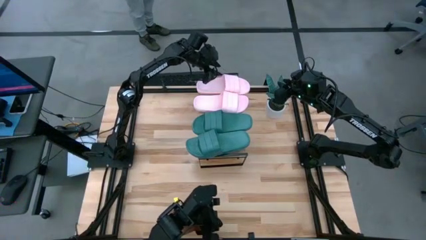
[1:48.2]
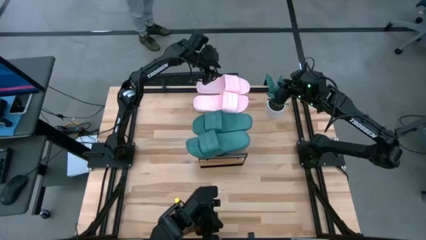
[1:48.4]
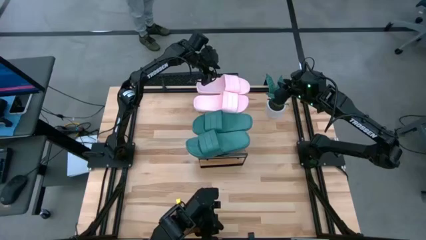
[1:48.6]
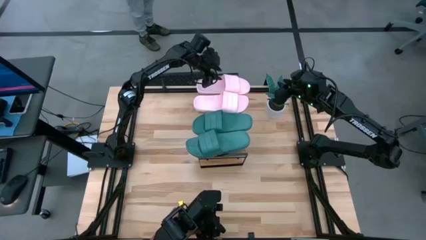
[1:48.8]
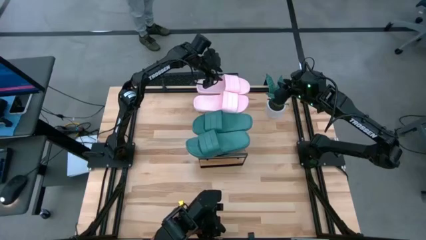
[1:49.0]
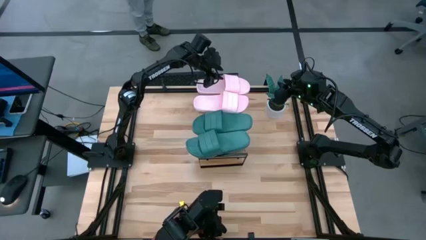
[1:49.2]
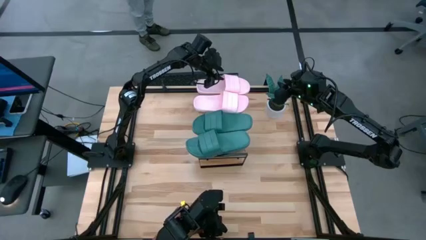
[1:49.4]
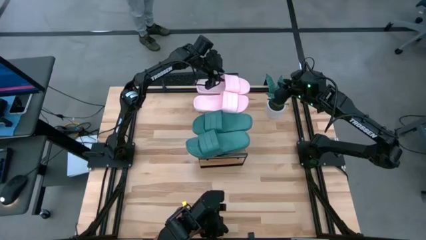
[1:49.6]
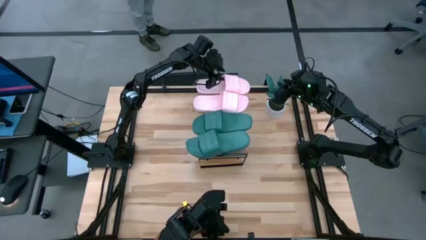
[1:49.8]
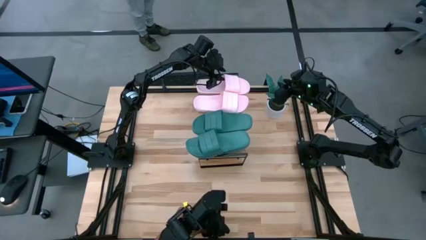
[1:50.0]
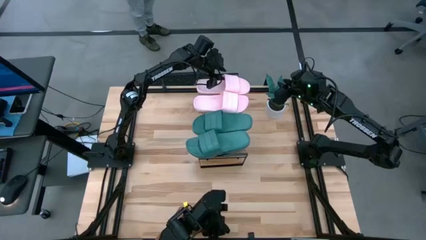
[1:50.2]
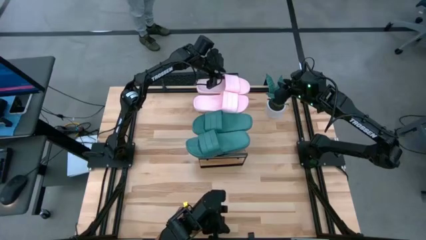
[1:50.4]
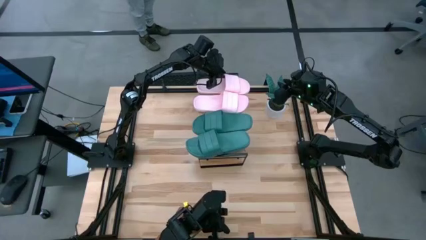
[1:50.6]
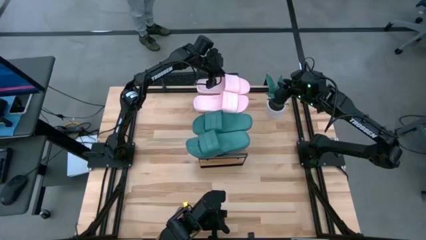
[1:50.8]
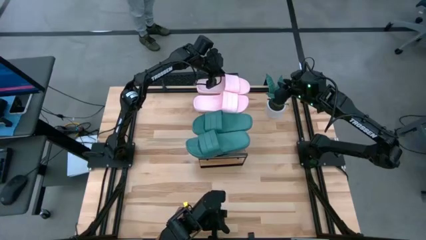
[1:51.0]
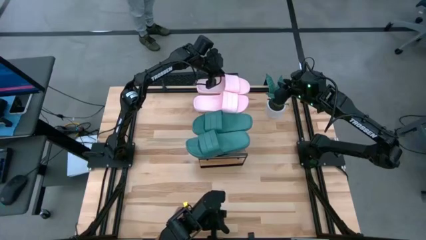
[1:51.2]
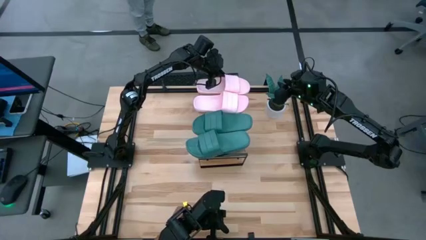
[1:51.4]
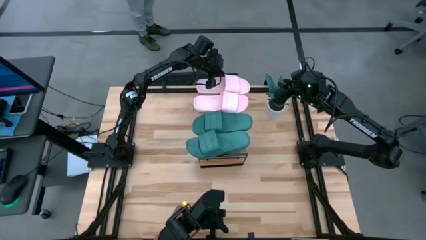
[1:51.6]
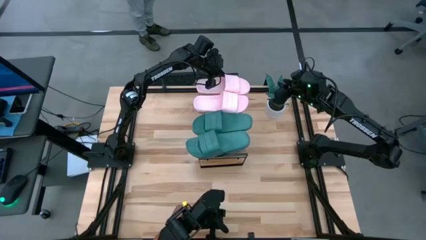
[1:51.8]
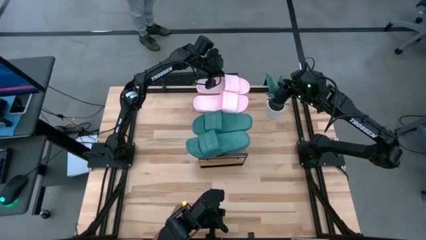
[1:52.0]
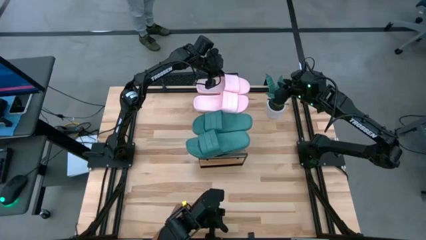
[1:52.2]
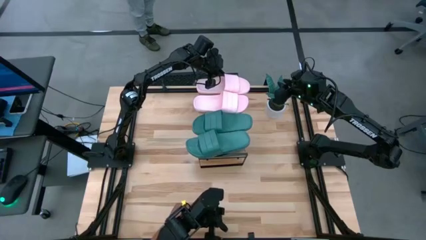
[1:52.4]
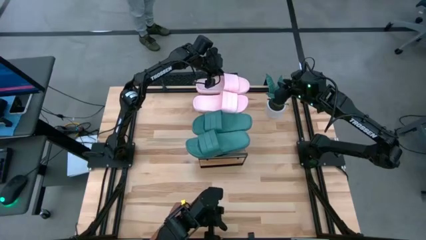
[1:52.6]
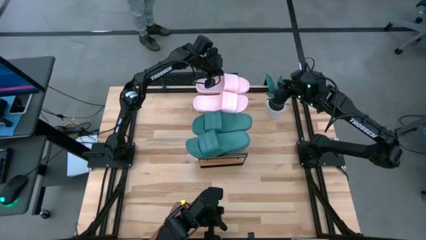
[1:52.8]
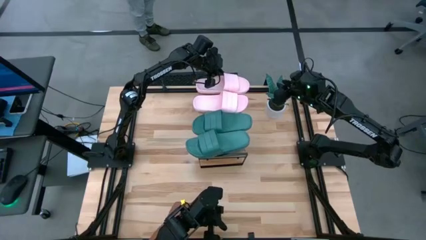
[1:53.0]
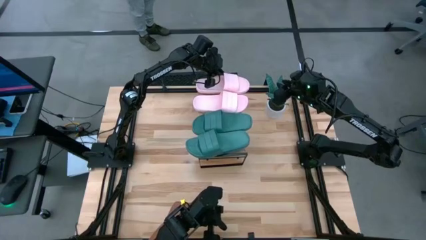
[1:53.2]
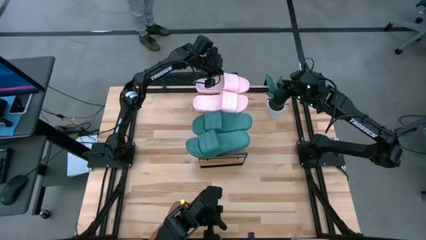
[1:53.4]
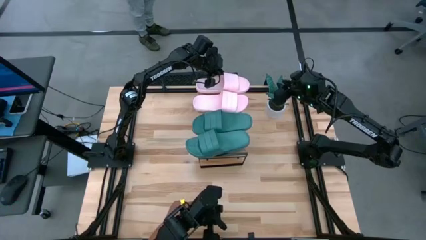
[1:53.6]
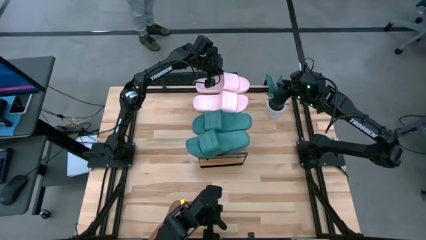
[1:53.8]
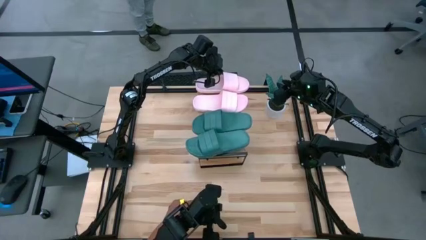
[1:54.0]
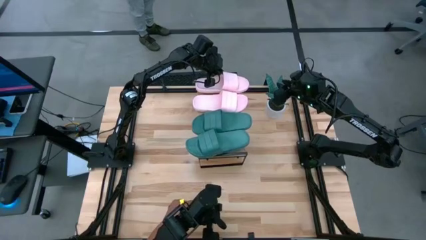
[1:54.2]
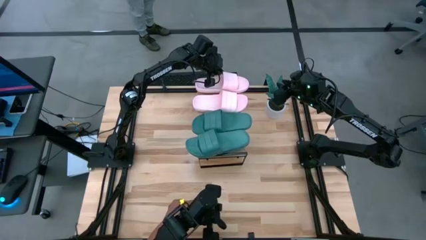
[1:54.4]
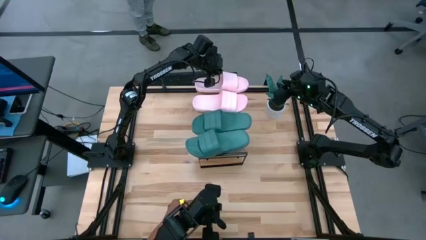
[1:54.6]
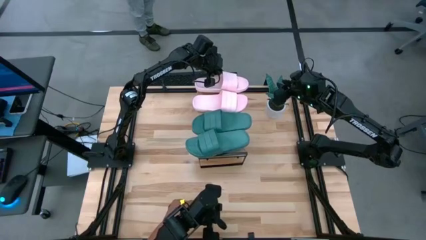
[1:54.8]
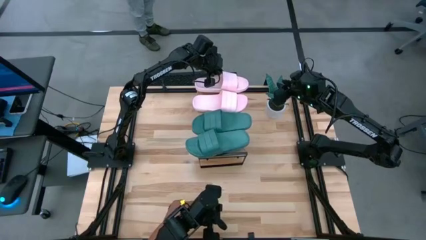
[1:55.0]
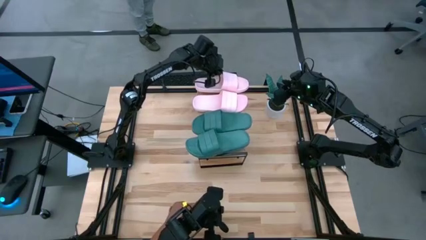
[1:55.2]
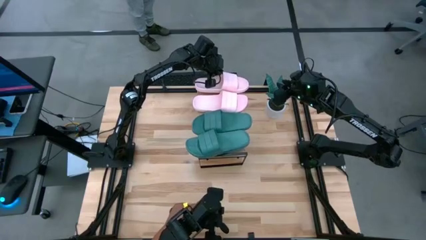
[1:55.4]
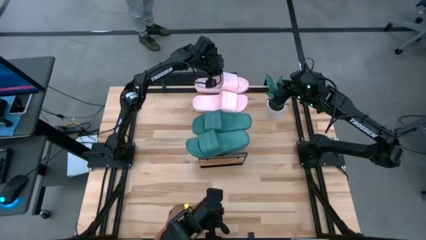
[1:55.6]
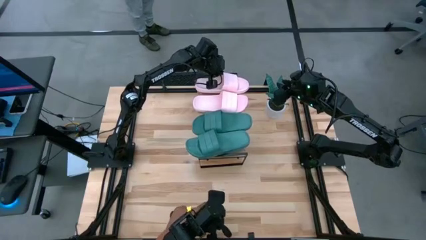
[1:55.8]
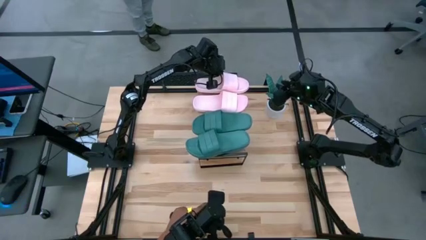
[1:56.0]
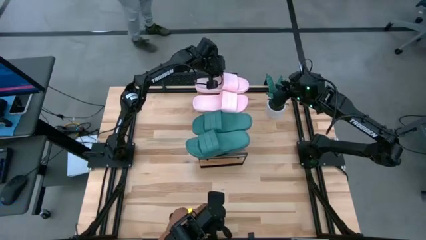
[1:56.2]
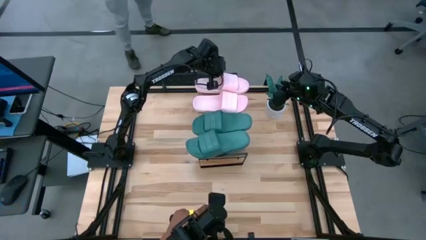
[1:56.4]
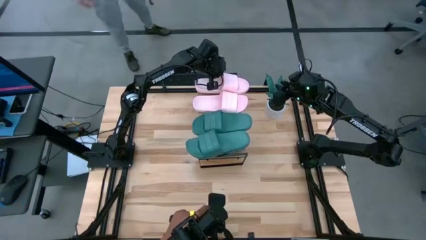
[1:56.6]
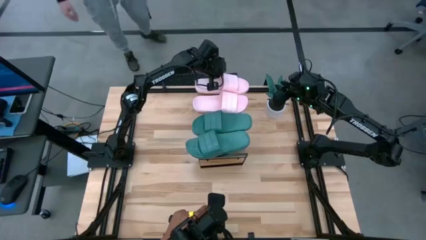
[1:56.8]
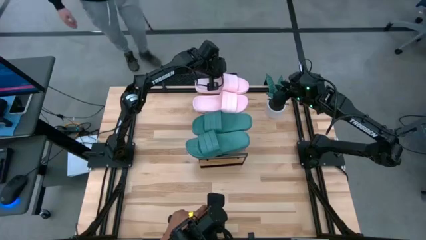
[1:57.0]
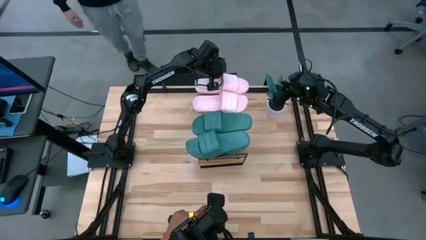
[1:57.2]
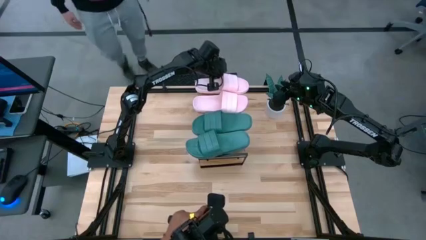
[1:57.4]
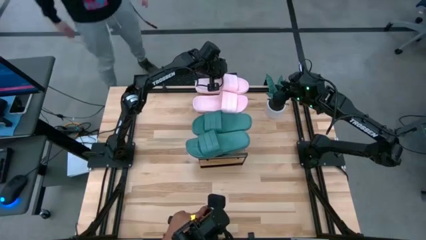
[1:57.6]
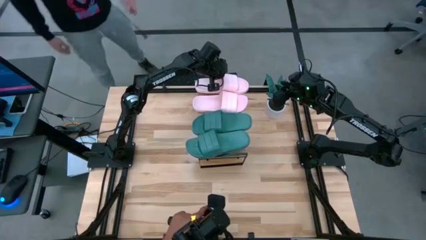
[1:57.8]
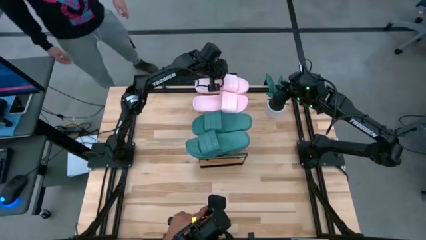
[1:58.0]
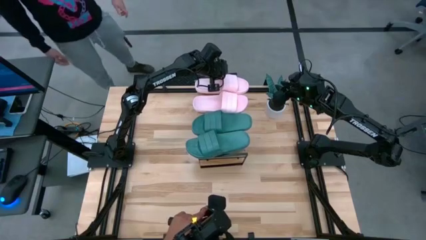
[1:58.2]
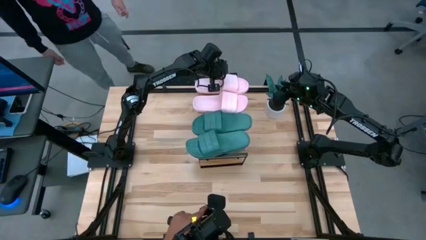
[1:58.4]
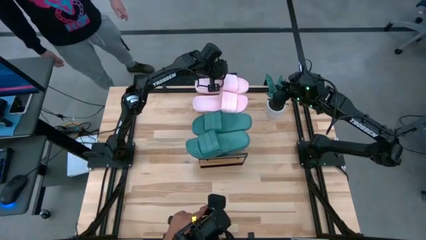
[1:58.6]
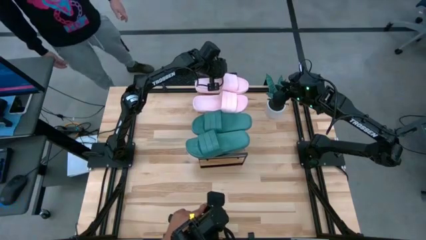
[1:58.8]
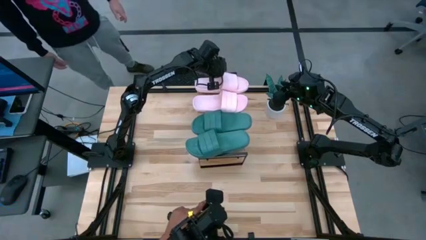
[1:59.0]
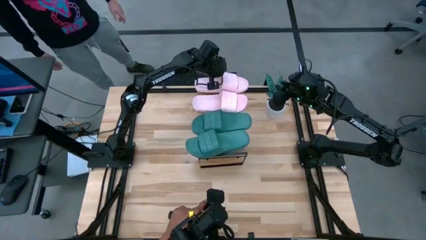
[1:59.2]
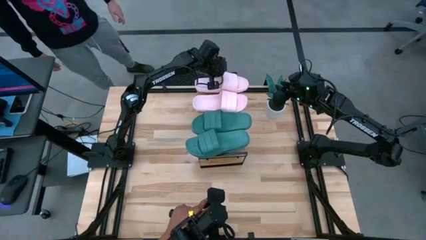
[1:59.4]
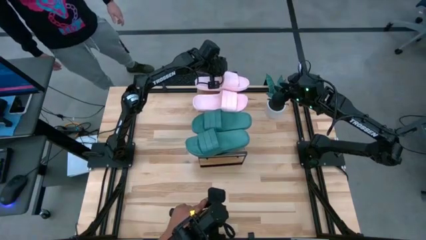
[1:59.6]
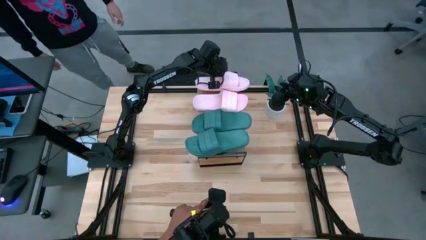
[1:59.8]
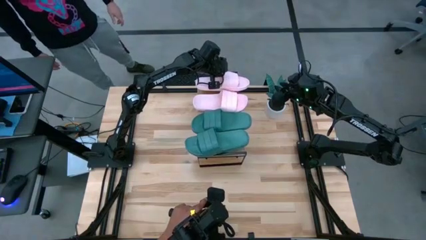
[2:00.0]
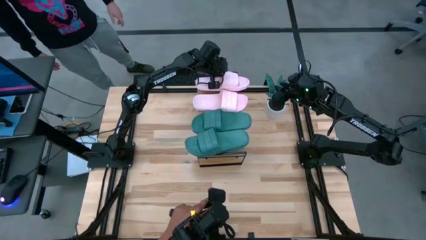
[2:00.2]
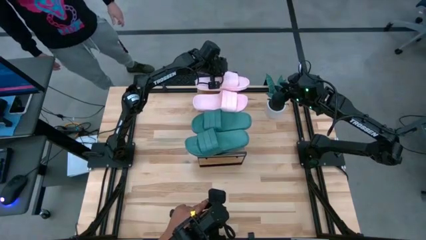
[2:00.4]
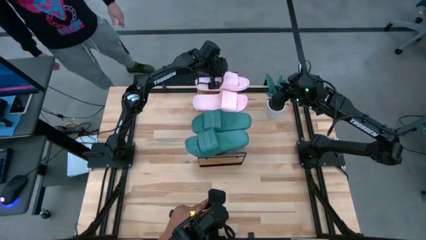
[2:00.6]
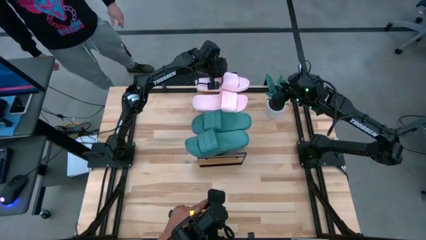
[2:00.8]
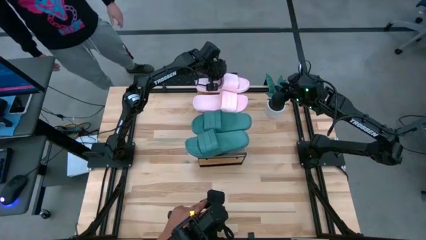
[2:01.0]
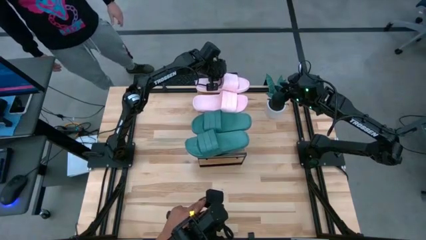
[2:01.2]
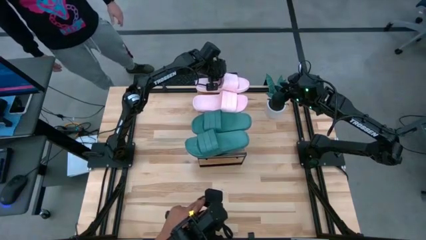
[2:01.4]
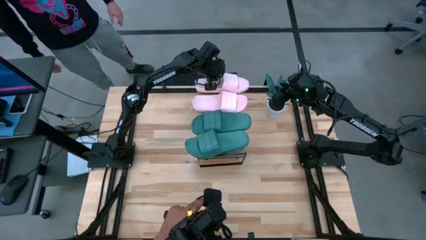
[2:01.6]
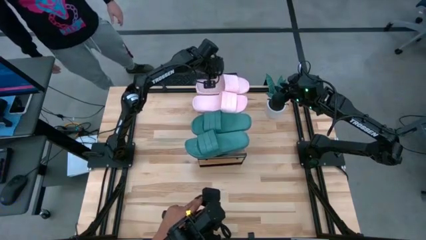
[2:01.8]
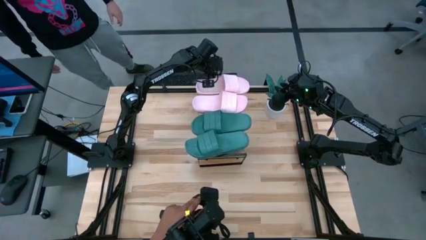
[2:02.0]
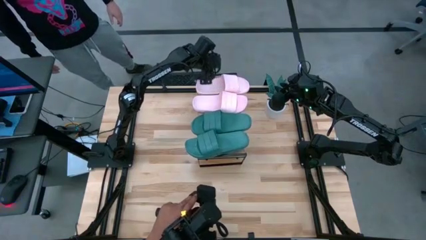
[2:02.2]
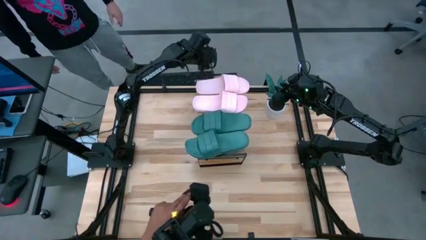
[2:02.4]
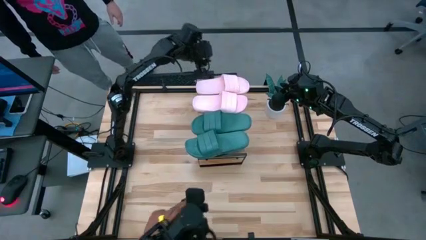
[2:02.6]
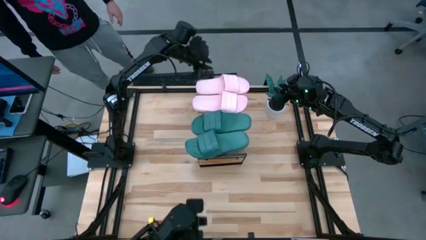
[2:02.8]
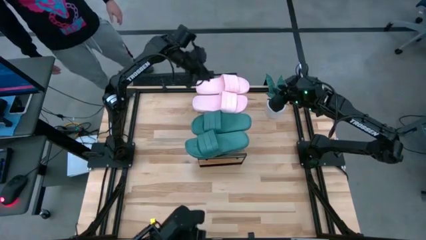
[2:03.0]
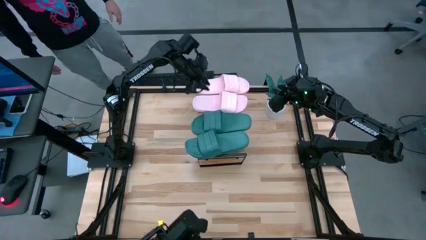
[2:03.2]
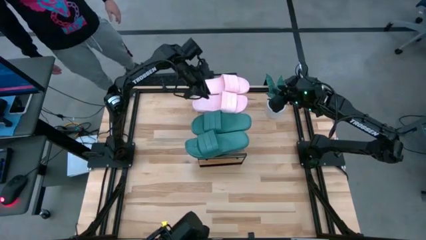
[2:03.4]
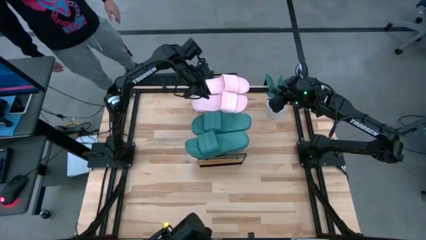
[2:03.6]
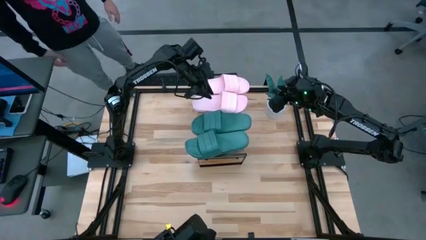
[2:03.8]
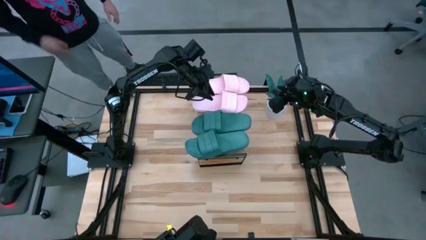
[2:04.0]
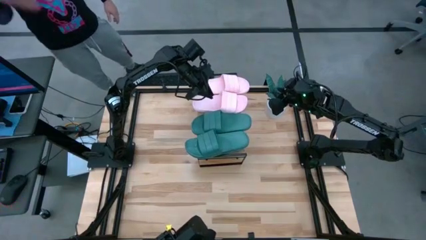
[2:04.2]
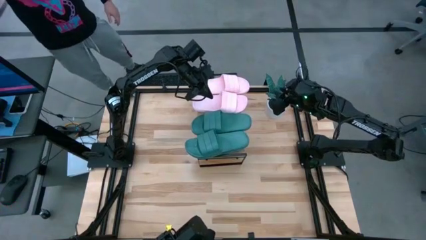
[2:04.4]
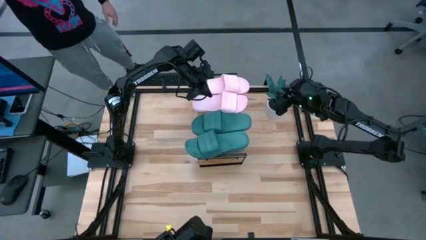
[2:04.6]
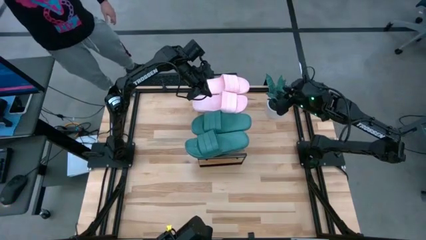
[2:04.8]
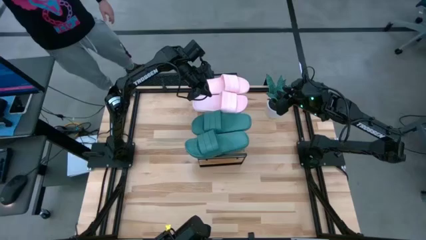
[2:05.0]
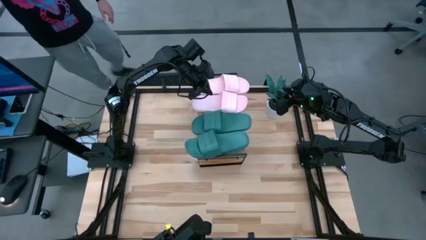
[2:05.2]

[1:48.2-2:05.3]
Task: Pick and place slides into the shelf
Adjust the slides on the shelf
